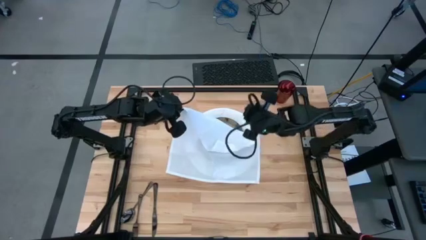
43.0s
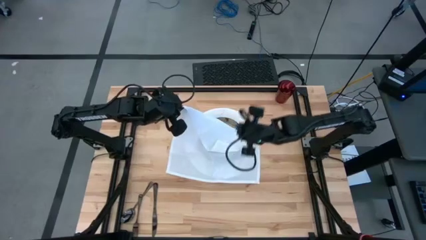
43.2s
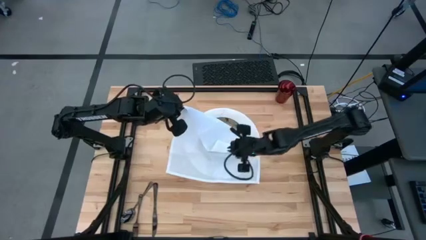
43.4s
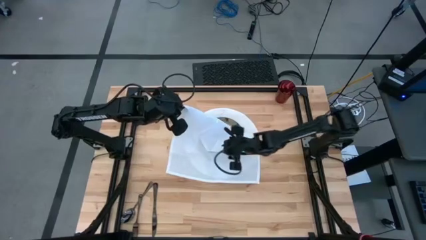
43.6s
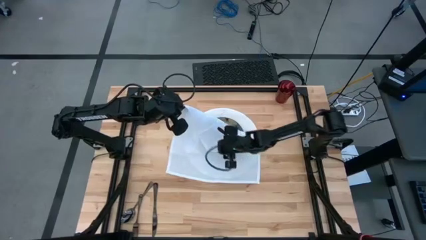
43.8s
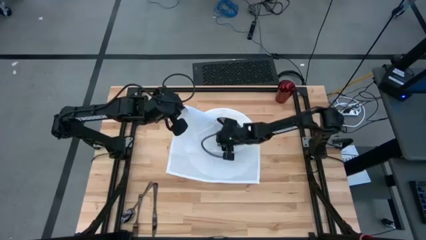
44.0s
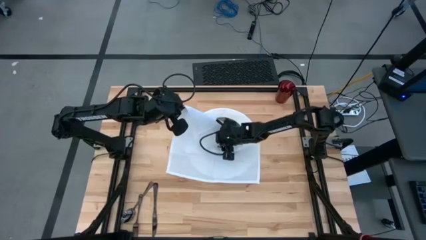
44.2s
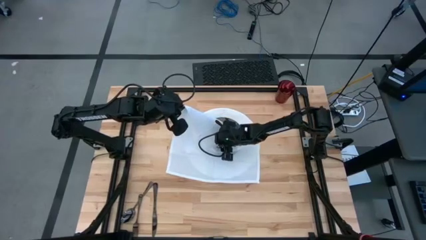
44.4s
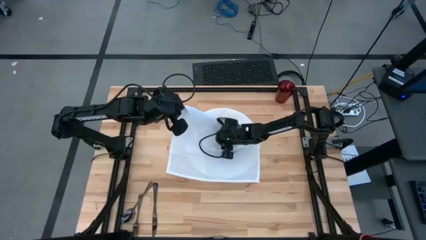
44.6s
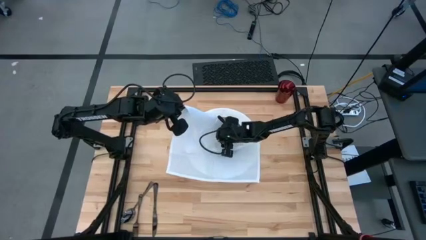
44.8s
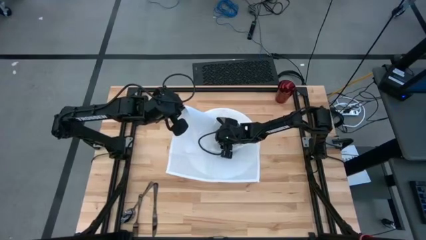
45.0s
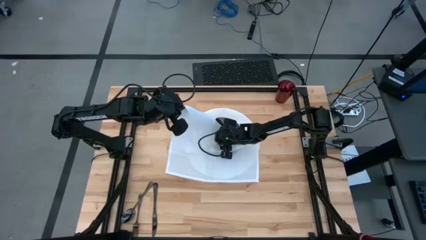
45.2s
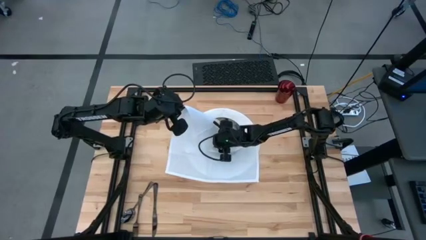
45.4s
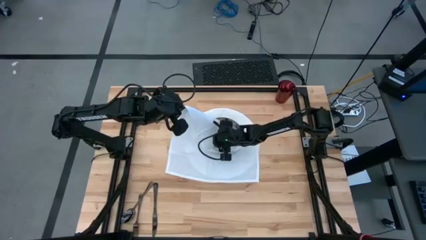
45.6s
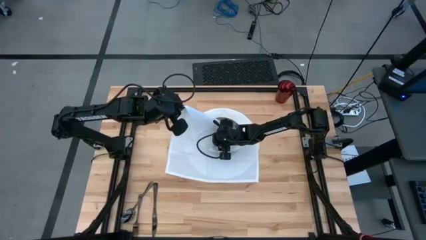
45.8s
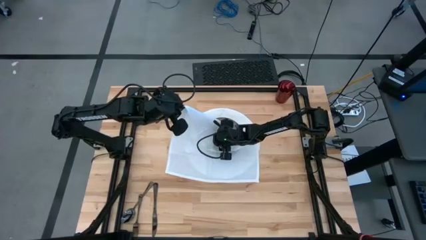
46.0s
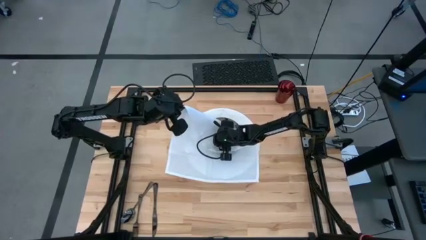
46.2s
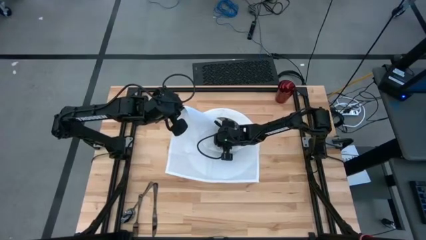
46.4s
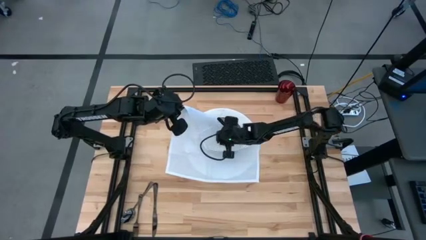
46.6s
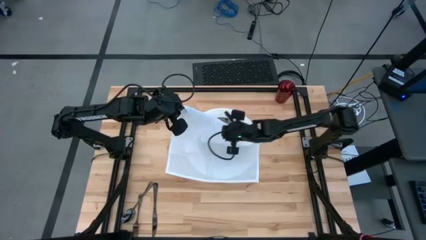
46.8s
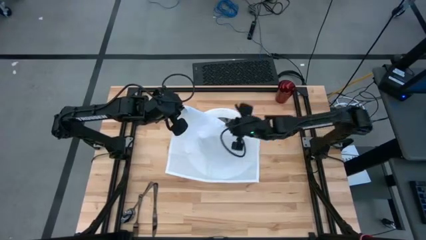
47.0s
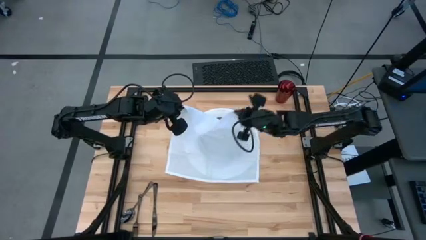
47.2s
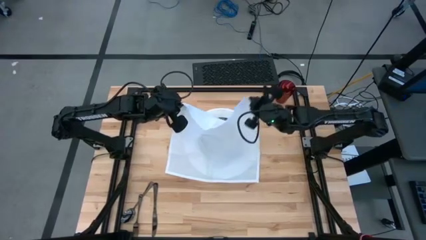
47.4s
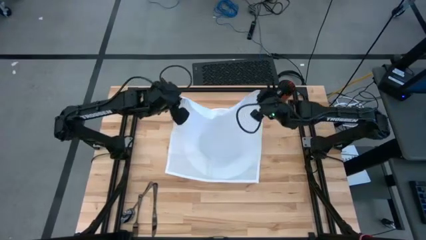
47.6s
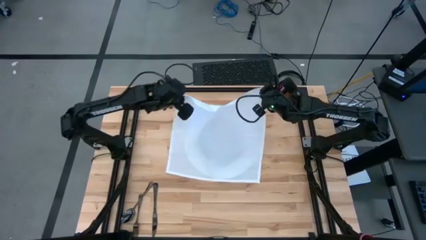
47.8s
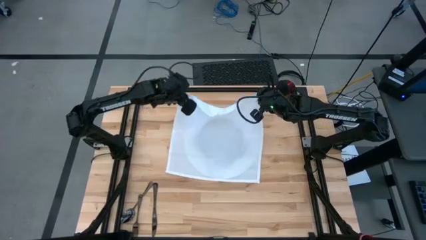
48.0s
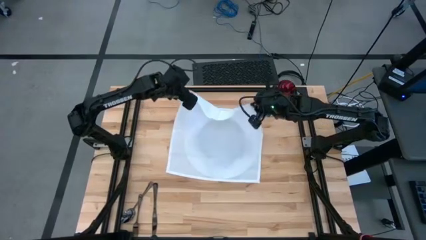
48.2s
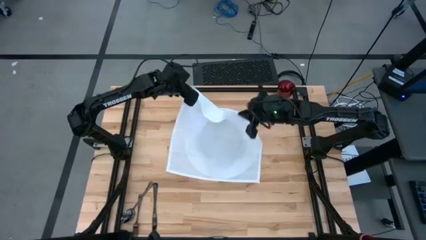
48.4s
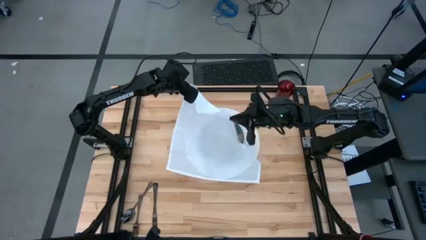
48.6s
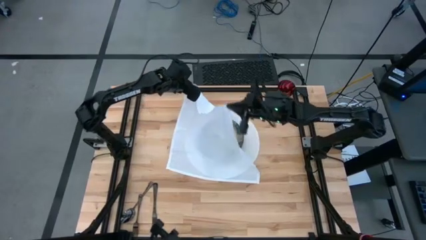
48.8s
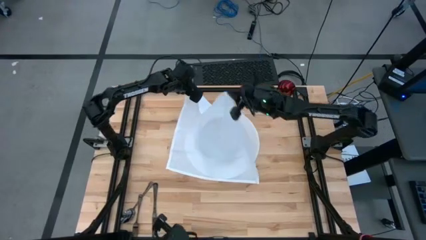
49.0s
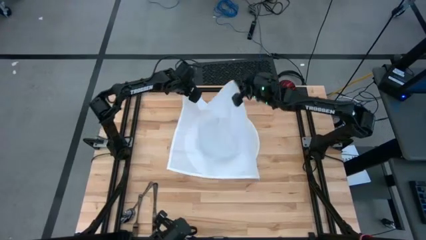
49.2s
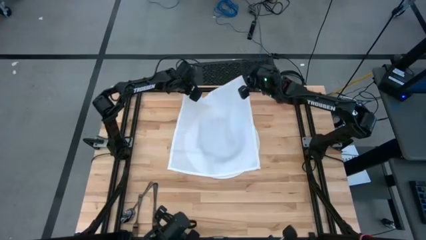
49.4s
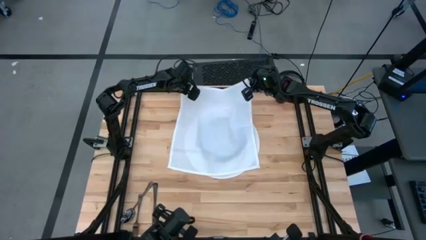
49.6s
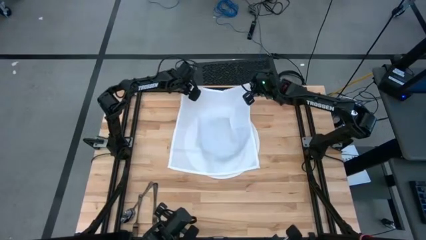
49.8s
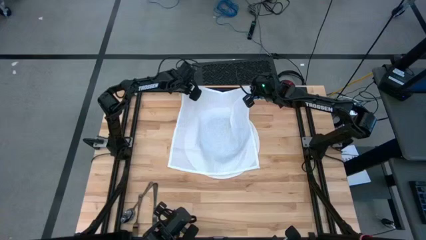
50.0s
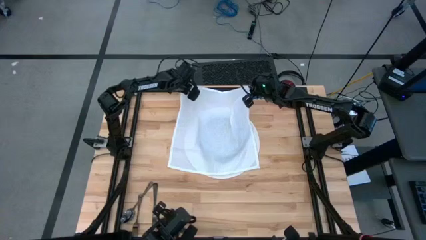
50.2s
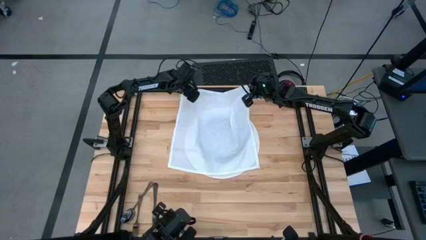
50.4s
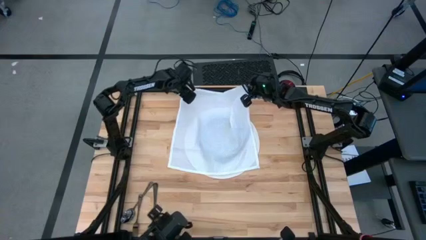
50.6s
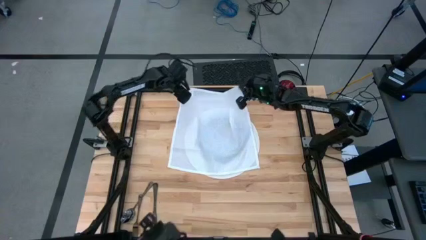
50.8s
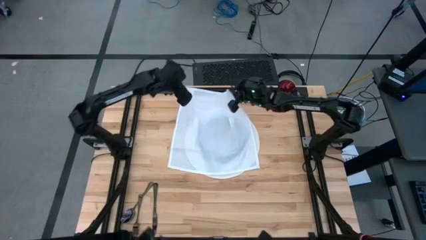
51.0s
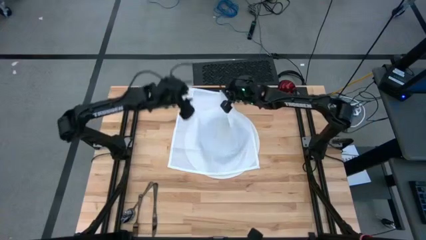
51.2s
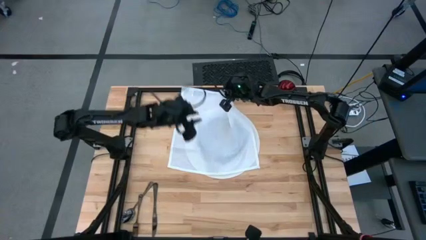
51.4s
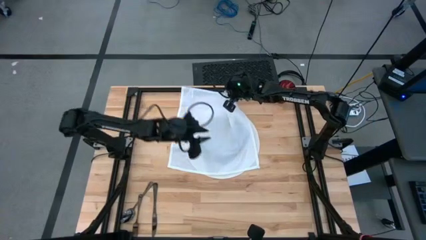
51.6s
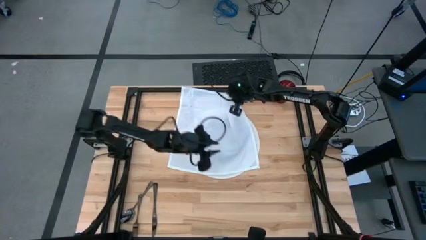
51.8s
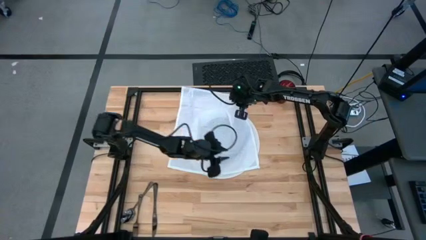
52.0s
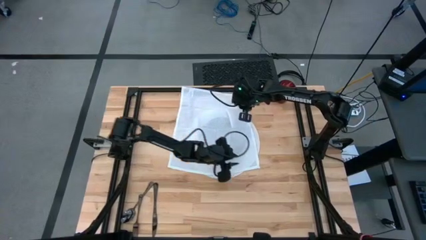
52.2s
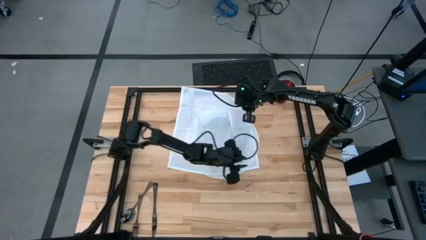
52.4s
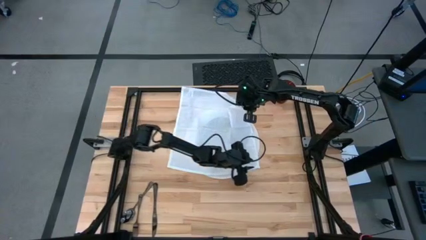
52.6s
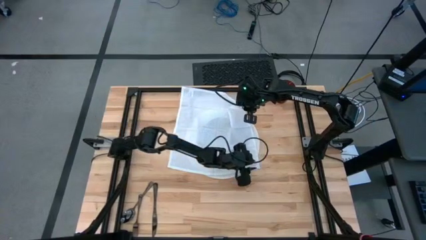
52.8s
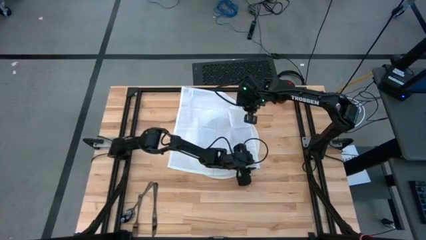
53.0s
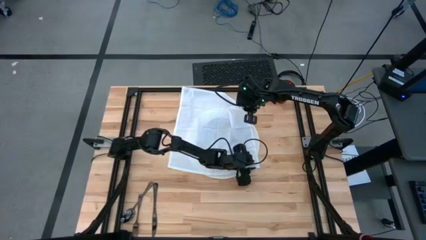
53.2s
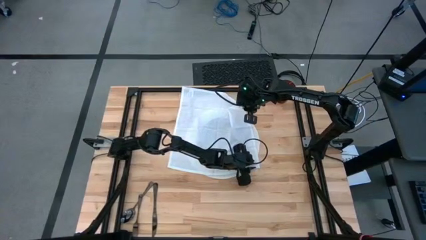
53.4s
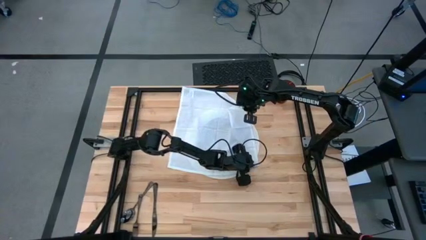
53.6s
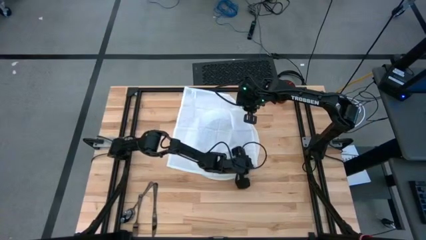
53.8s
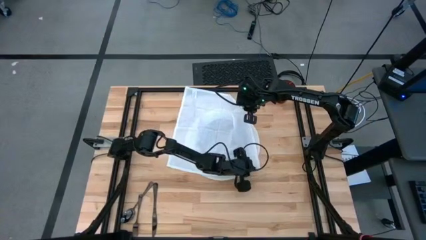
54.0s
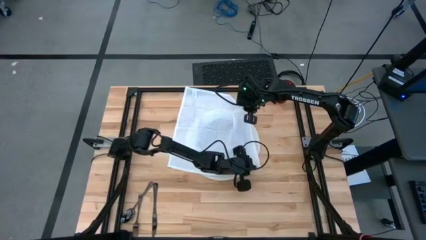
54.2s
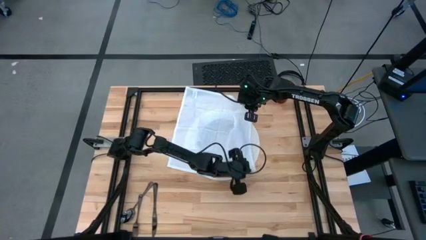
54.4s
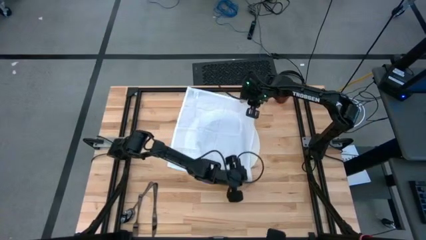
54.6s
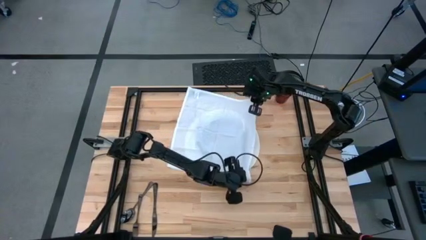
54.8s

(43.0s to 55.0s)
Task: Set table place
Fold the white napkin

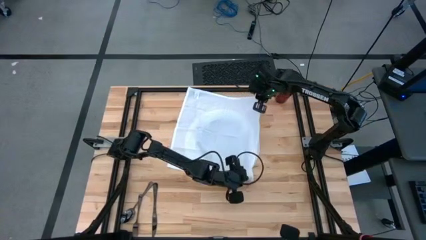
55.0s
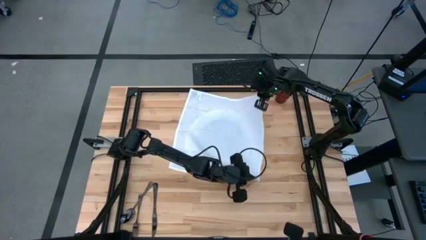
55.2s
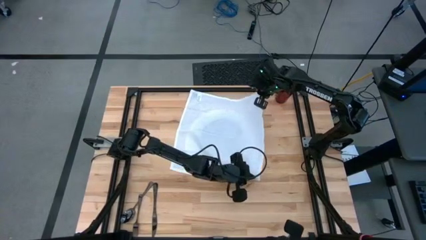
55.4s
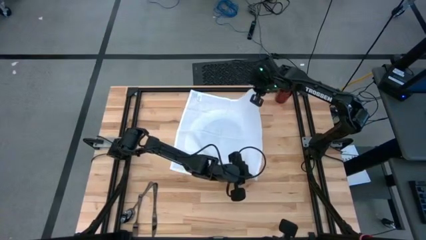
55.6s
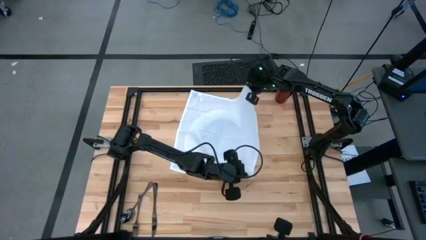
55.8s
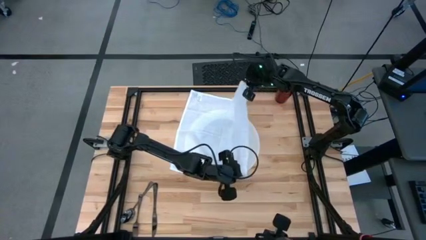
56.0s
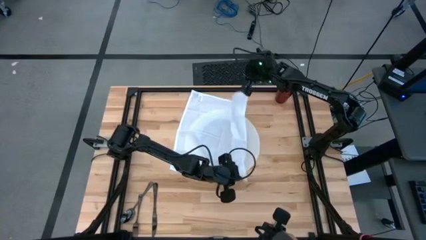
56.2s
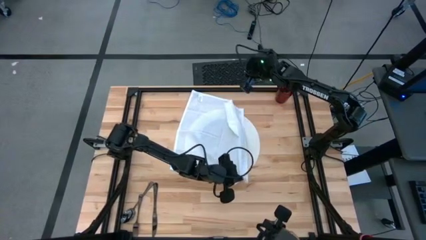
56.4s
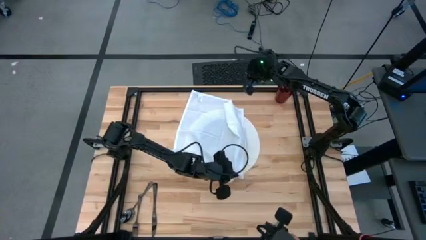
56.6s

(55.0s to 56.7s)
Fold the white napkin

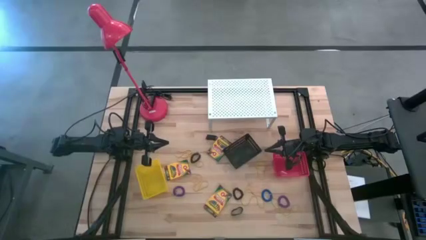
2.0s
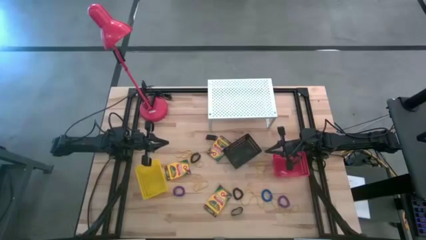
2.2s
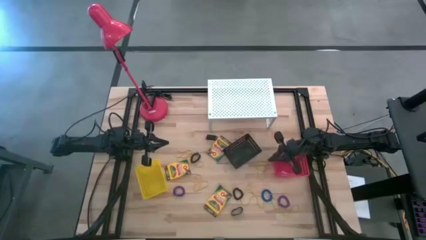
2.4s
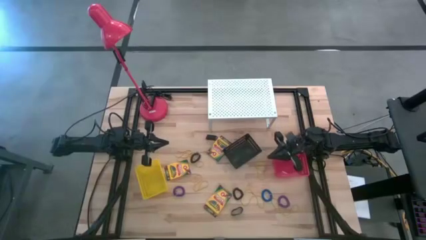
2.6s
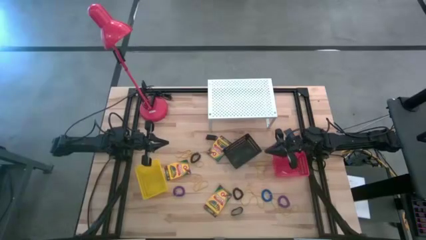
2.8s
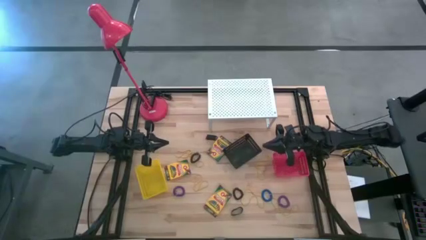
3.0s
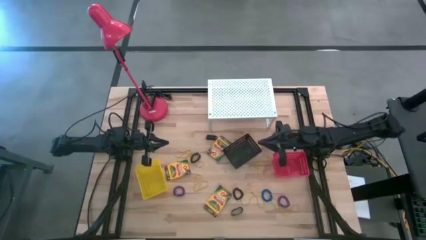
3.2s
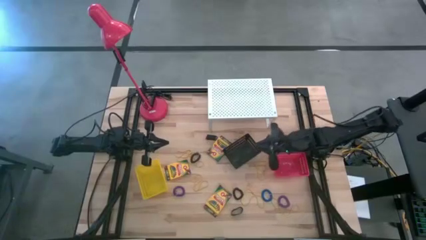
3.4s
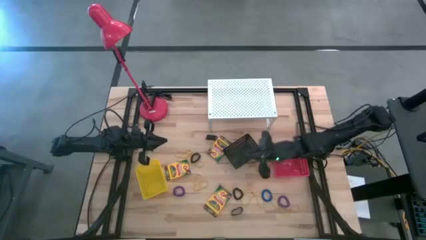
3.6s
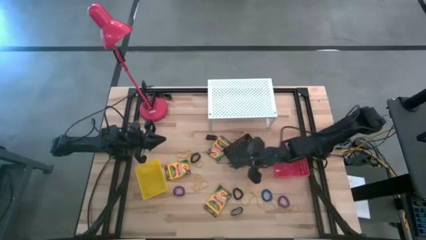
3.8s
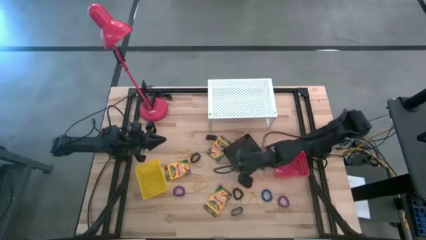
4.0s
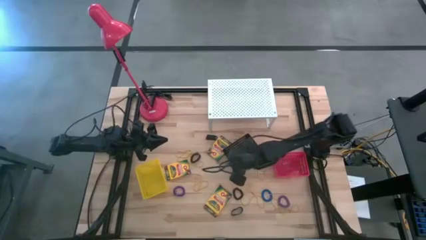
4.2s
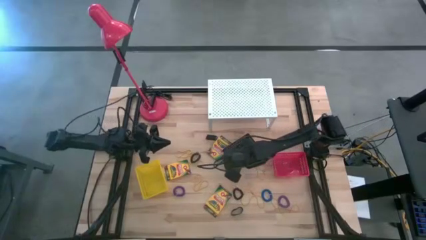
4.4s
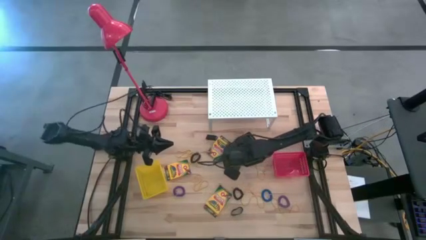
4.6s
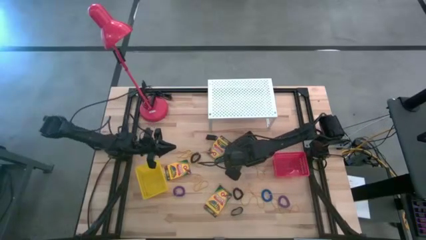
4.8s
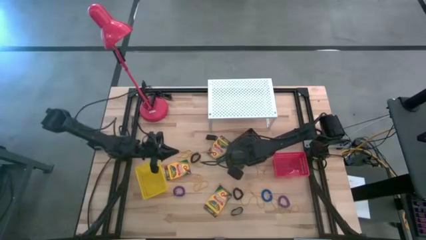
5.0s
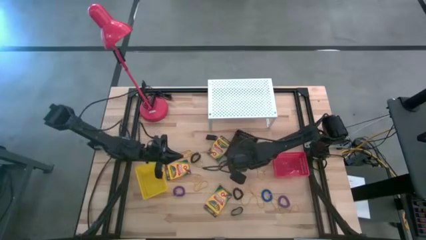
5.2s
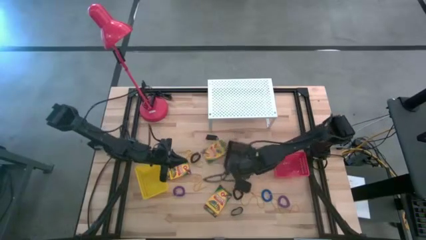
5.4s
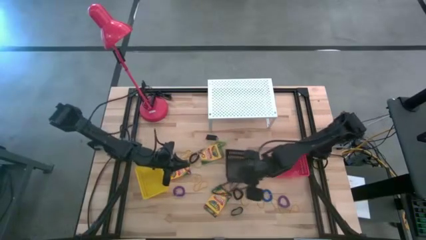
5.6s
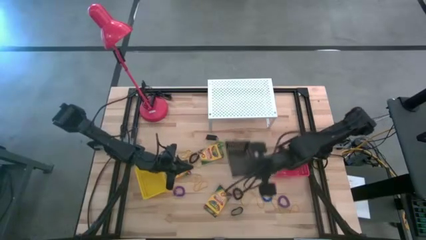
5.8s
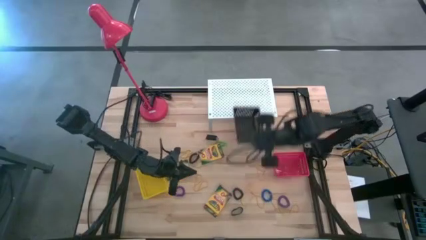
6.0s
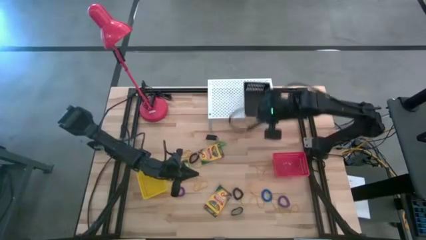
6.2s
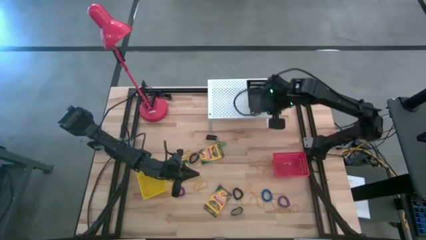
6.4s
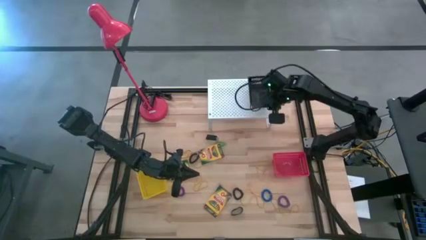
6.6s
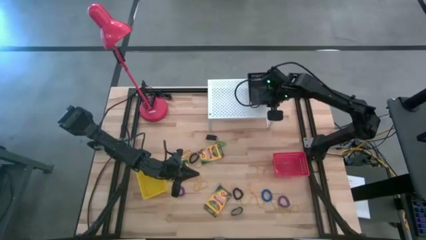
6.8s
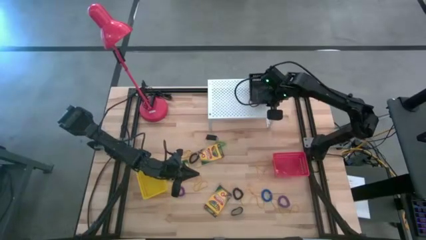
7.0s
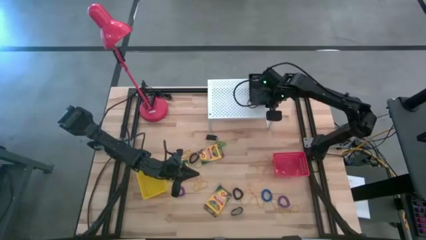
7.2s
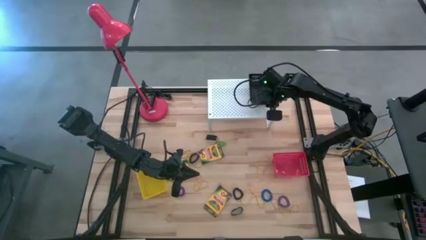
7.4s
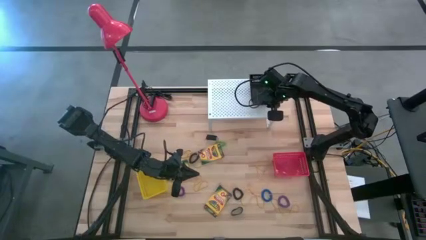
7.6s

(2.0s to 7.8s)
Task: Pick & Place Office Desk Supplies
Put the black bin on the shelf
